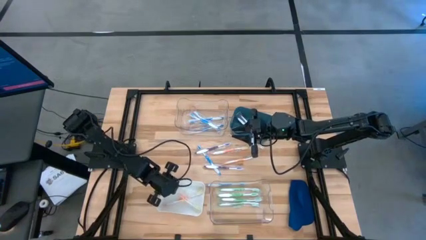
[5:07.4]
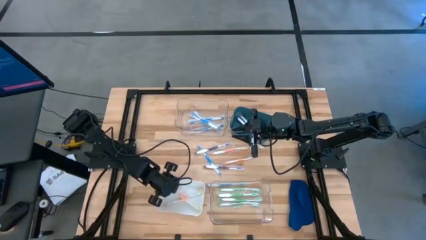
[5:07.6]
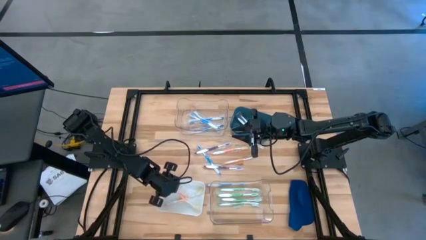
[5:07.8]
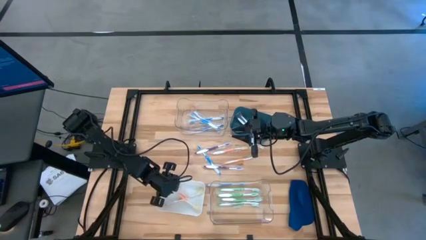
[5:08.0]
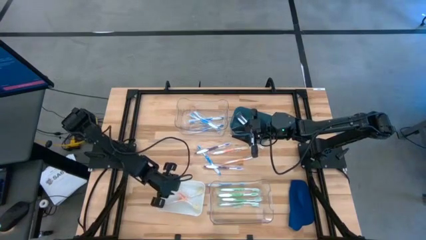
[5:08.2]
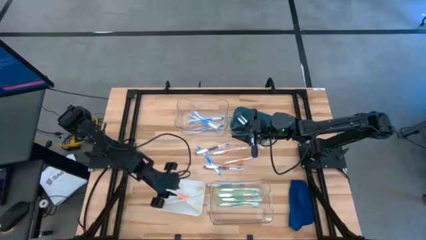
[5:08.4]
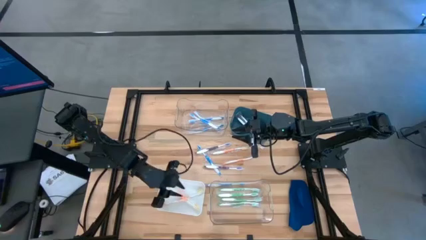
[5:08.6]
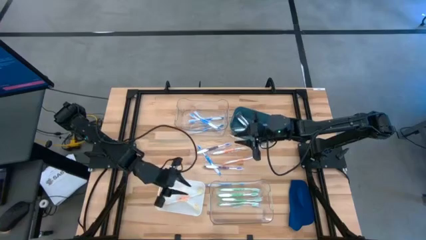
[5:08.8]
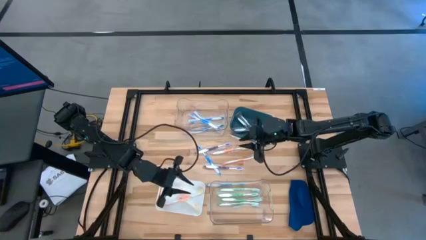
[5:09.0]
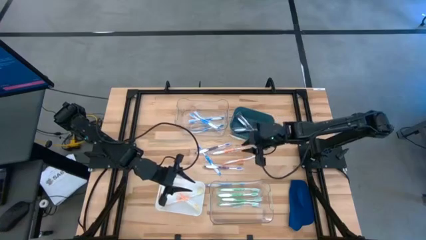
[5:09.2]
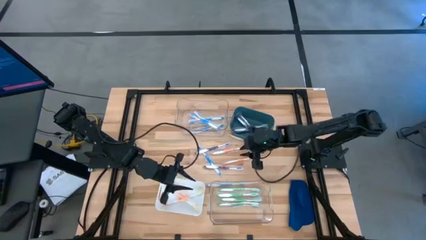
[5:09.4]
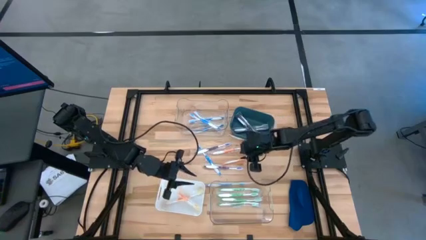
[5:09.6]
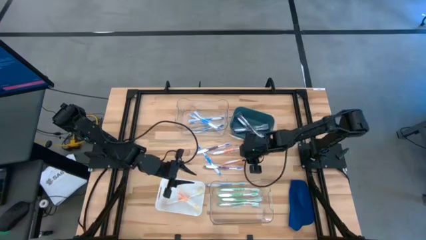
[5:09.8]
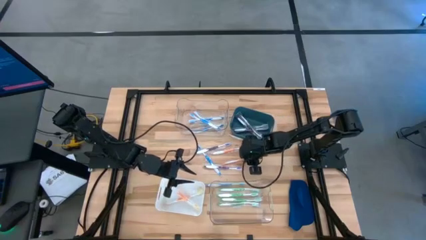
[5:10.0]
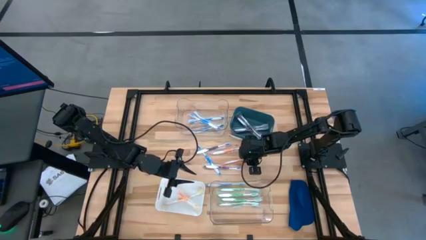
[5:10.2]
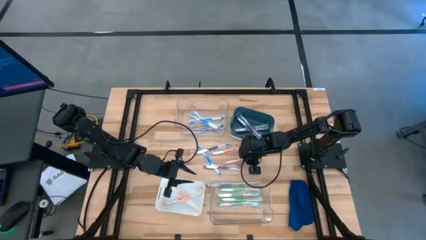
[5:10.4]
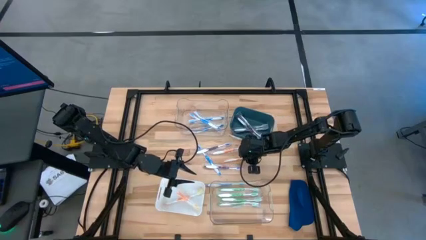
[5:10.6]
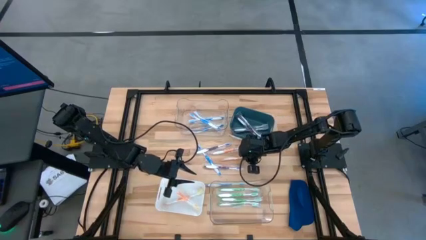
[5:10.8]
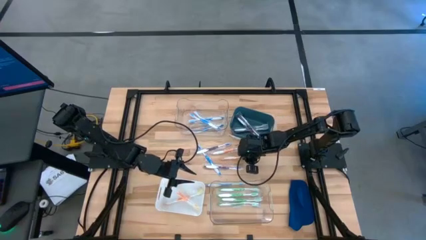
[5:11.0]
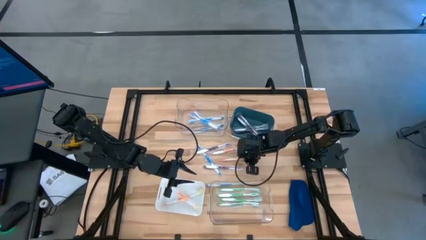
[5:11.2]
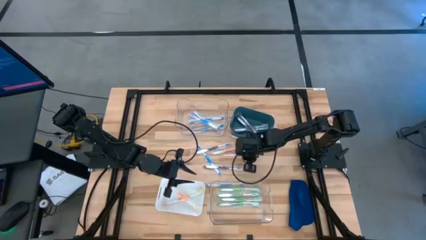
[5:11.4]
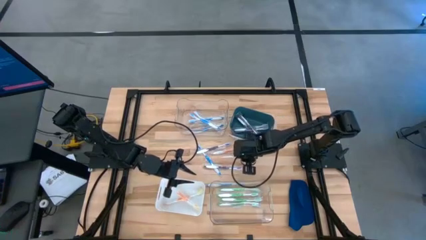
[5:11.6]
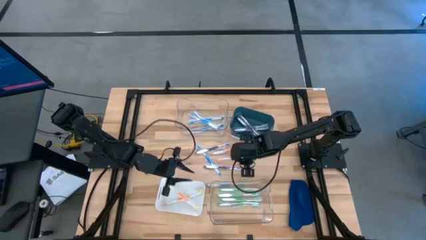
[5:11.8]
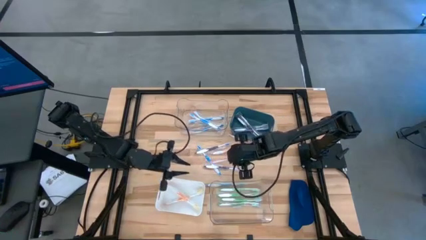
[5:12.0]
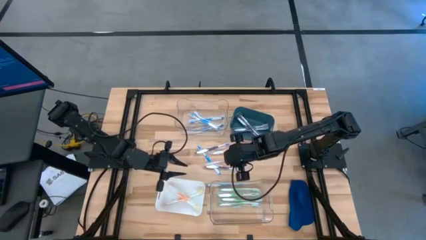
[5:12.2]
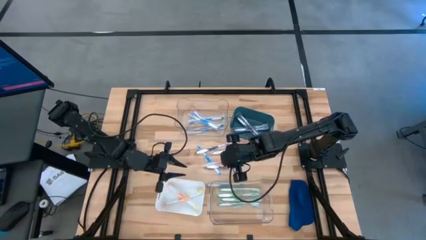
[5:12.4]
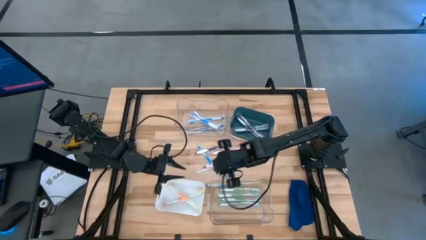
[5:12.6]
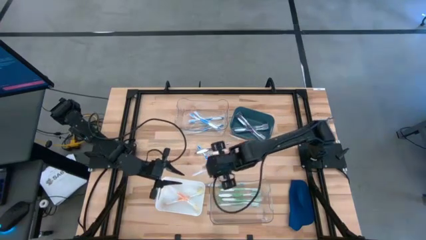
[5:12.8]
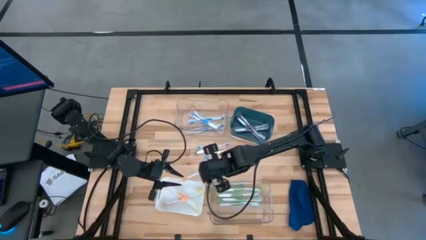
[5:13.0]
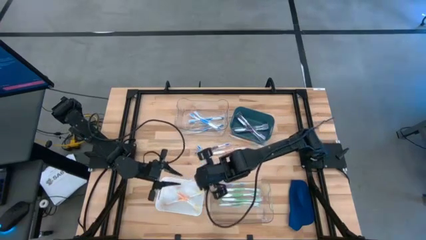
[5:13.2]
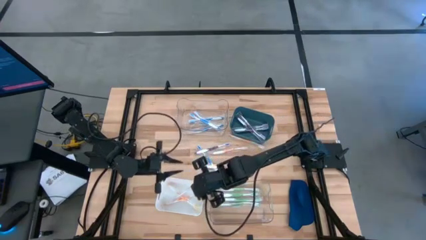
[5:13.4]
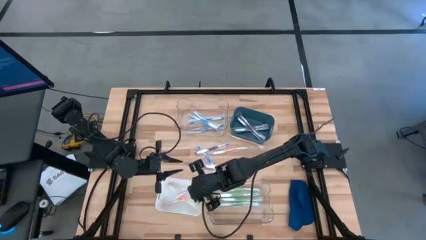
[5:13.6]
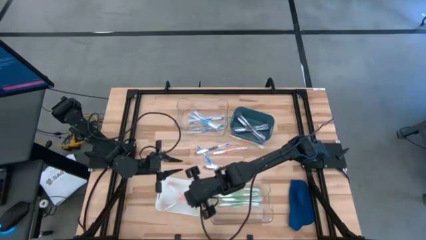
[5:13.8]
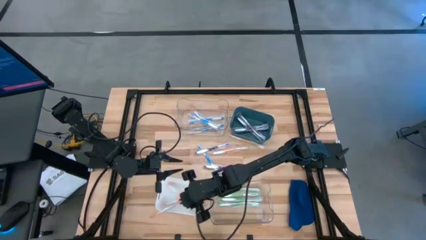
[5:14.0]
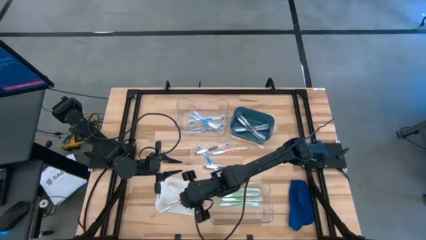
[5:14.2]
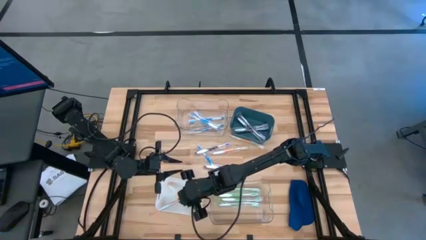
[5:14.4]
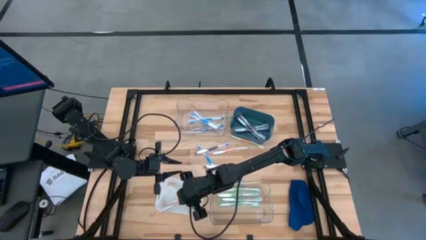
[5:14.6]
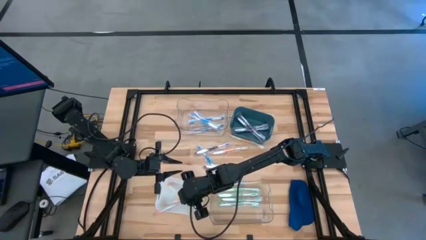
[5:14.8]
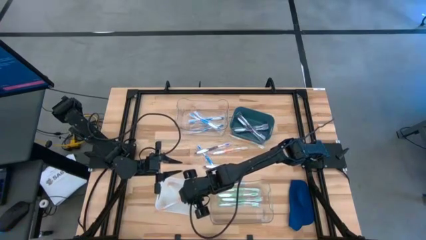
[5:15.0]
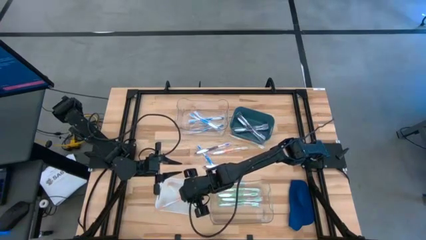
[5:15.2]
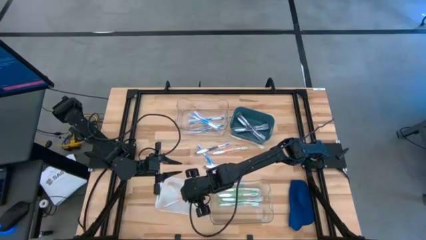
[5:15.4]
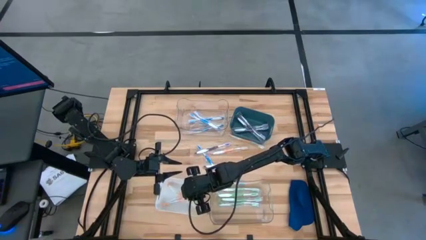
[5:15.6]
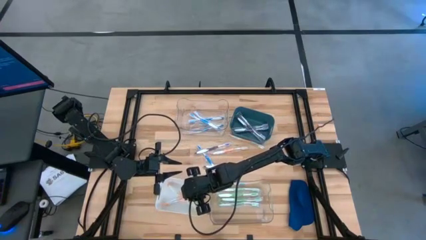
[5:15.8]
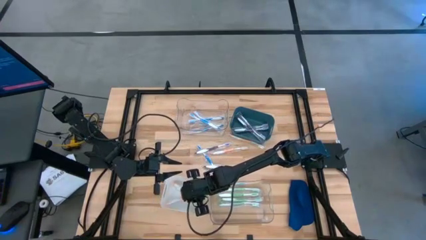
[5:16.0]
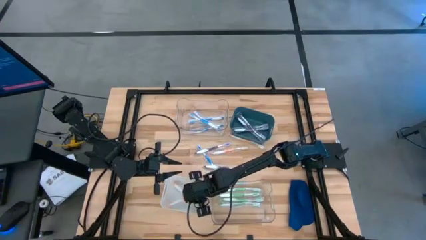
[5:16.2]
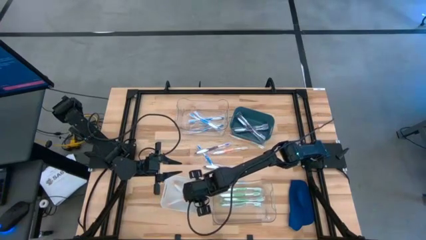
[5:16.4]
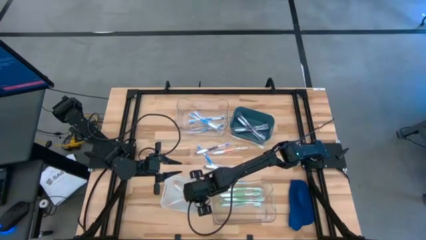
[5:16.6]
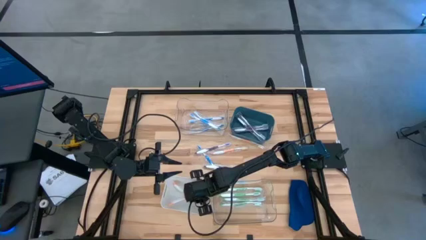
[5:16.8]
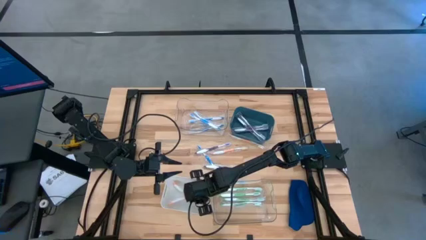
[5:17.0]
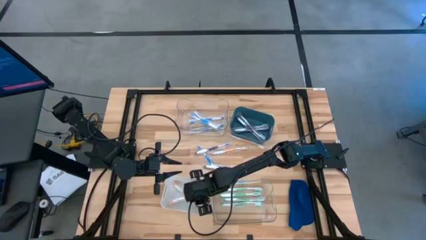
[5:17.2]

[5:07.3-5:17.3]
Task: Pick & Place Toothbrushes
Put the orange toothbrush into the white bin
